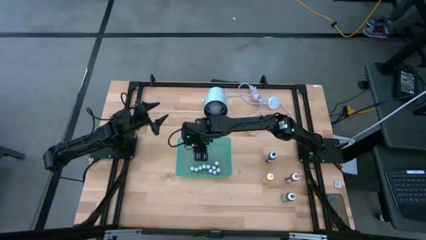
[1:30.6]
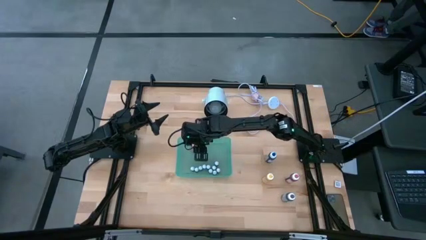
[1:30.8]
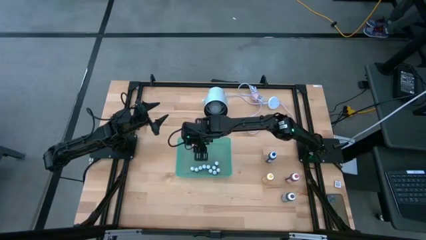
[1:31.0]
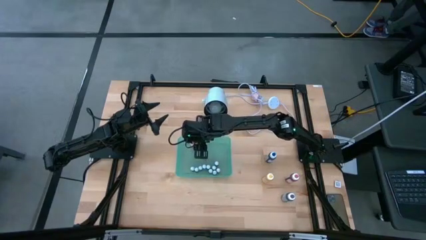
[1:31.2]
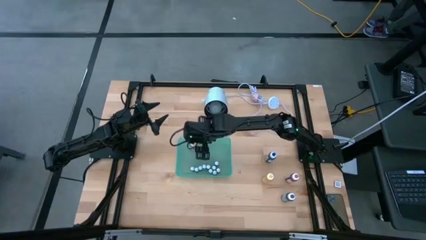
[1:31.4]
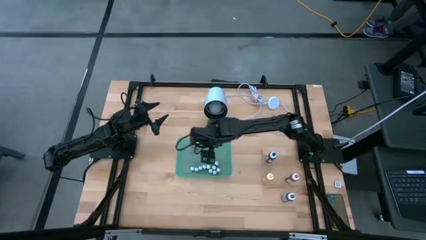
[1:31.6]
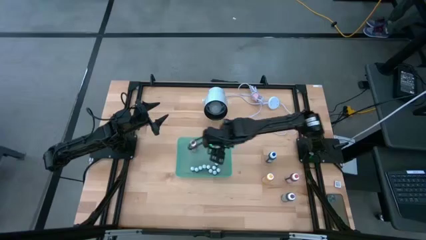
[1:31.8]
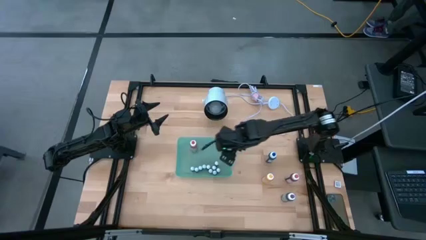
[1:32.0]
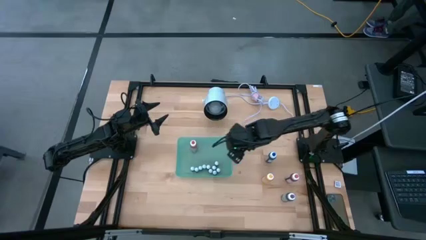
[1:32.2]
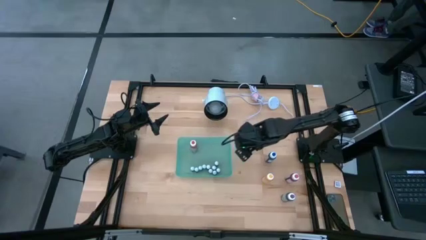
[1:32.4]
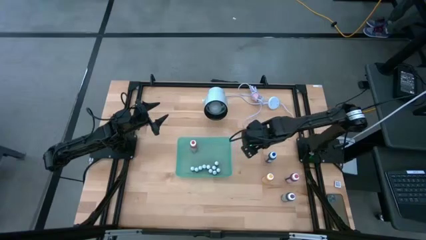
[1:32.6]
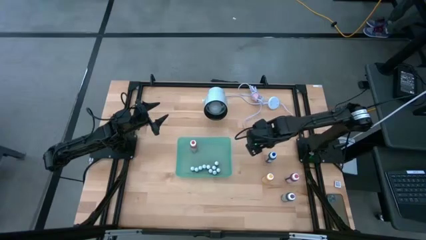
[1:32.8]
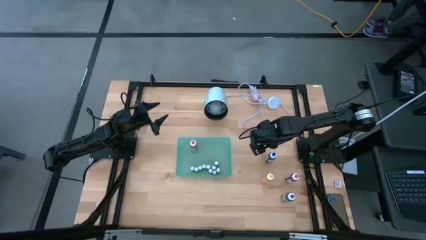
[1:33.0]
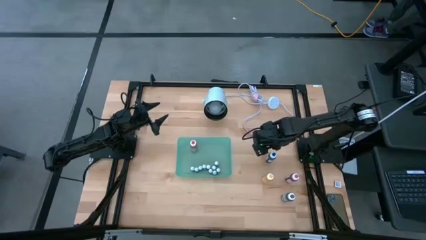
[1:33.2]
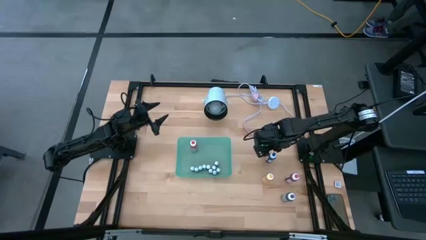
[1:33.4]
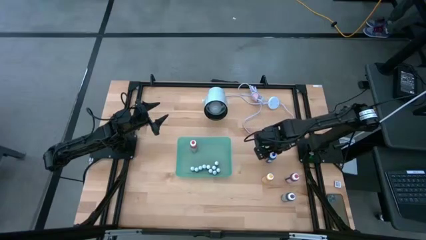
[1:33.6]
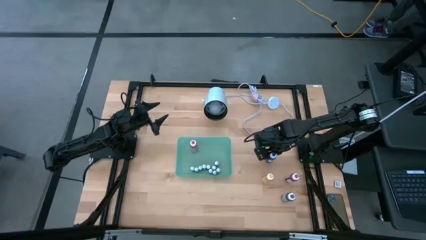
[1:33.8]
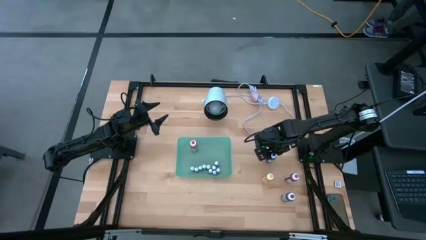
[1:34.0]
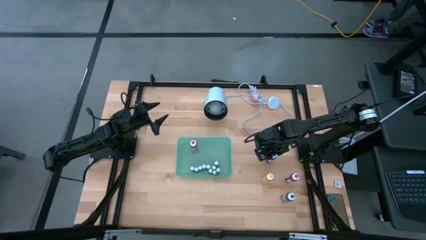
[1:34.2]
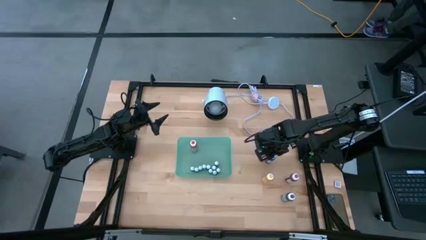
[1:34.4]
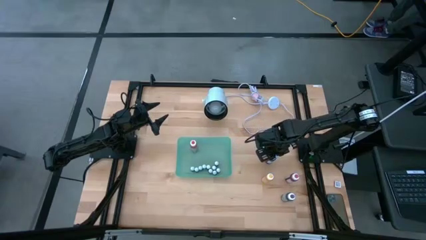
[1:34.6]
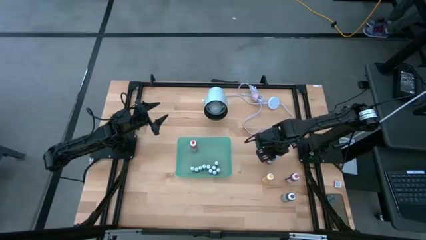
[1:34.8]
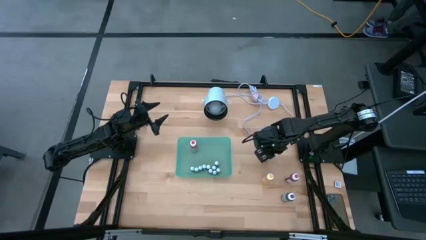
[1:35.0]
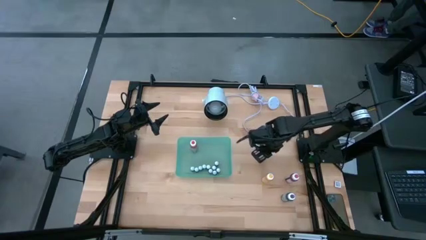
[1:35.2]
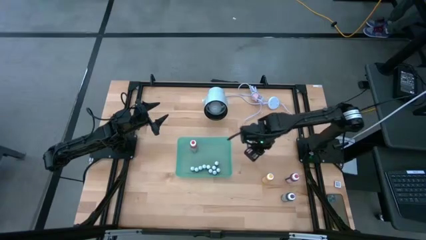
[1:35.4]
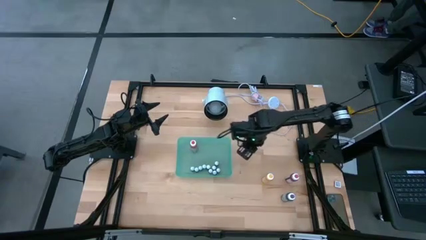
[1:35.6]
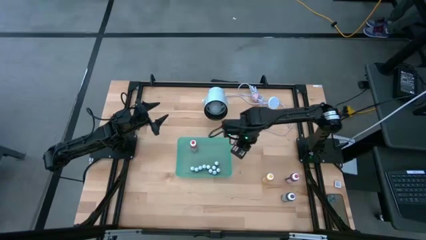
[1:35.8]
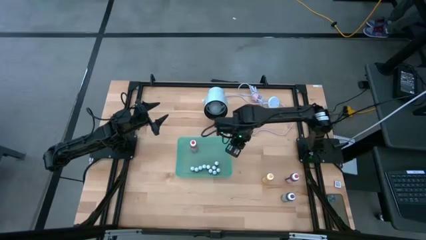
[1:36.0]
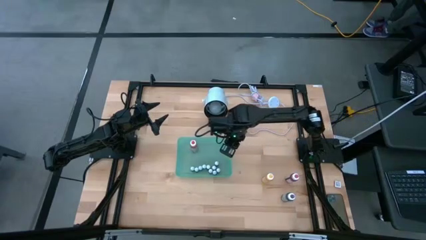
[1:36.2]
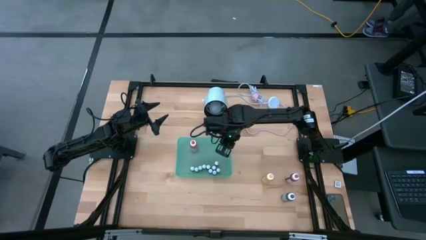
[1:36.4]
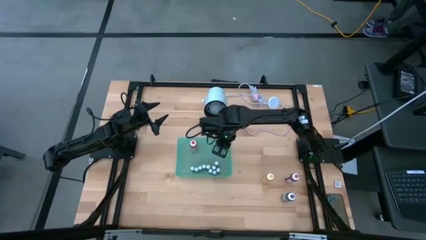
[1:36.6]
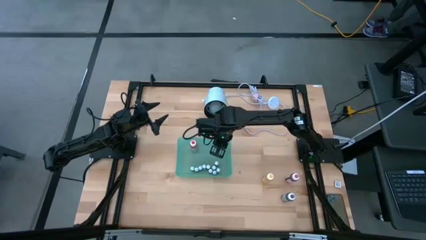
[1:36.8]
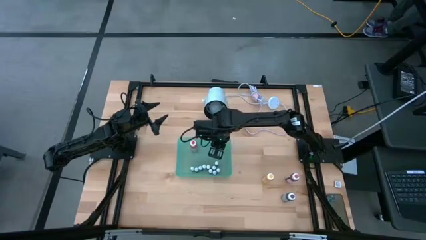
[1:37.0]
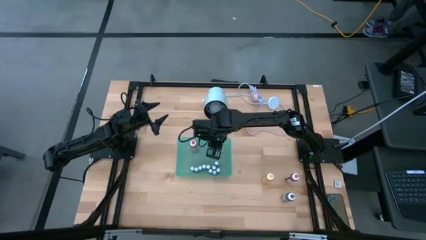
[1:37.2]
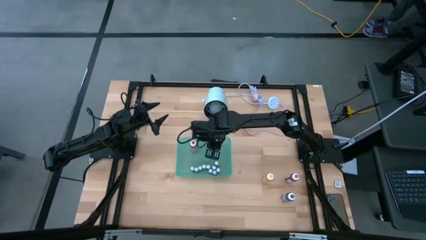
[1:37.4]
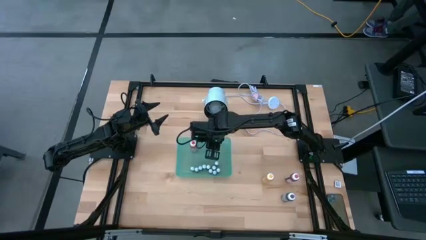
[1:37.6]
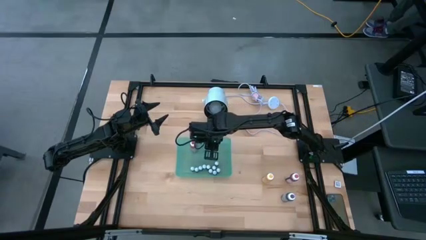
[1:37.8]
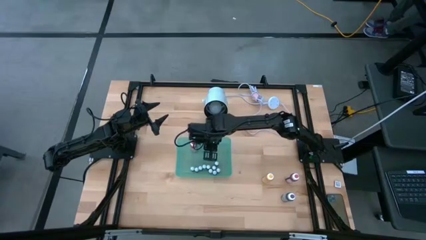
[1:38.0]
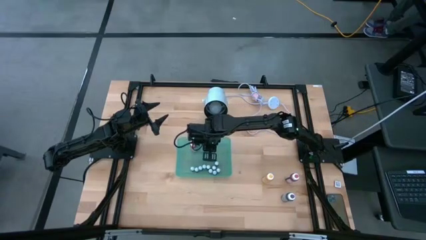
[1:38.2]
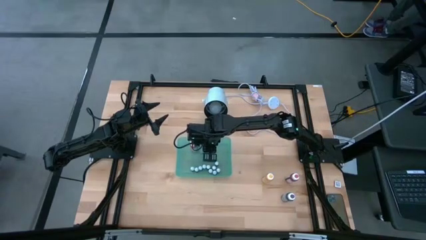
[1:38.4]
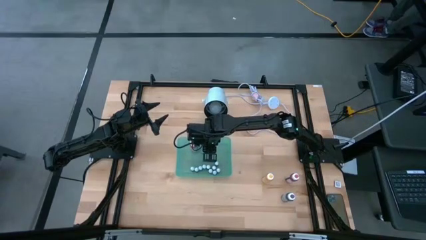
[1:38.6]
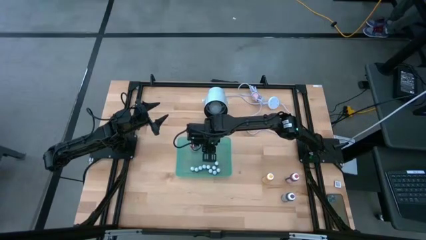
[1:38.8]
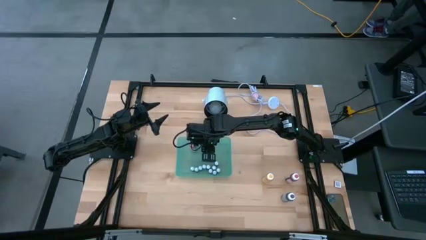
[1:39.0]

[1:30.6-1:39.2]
Task: Pick & Place food coloring
Put the large blue food coloring bottle into the bin

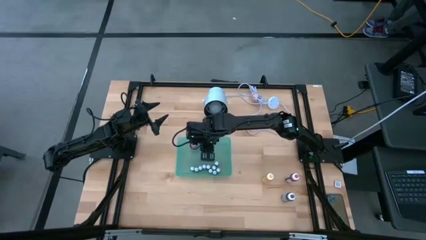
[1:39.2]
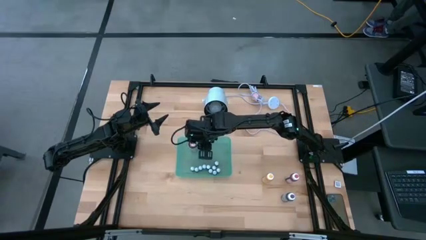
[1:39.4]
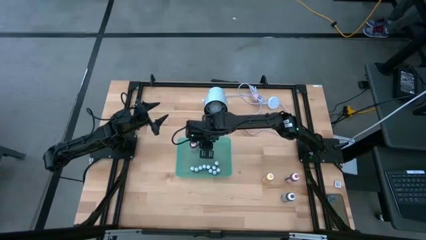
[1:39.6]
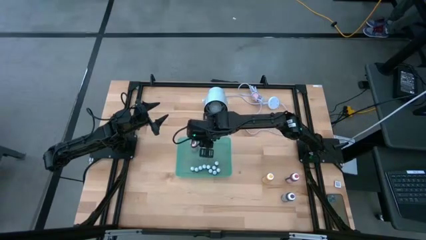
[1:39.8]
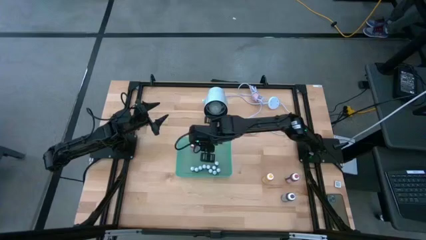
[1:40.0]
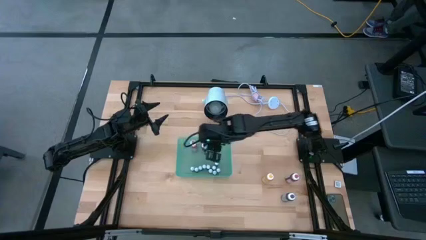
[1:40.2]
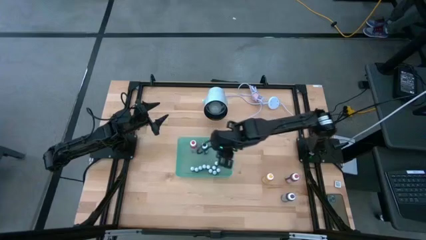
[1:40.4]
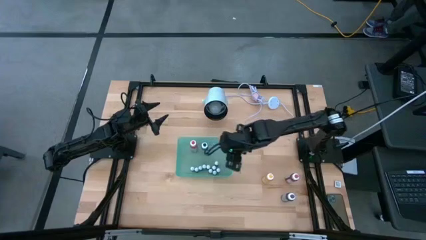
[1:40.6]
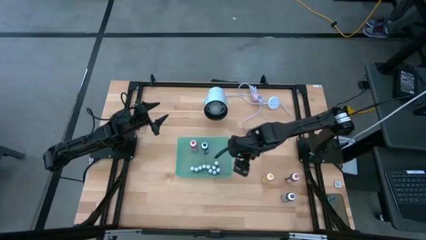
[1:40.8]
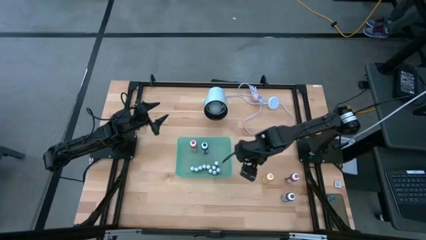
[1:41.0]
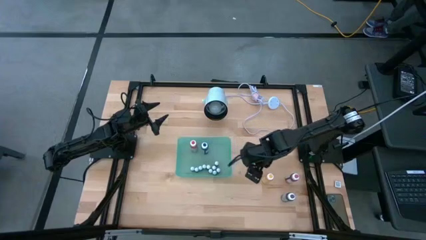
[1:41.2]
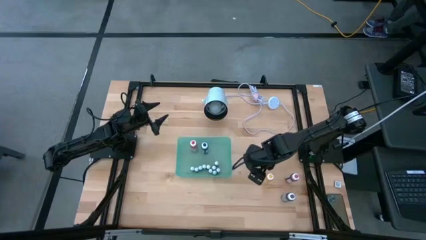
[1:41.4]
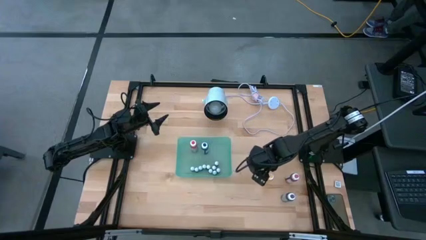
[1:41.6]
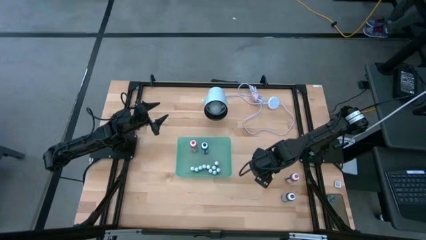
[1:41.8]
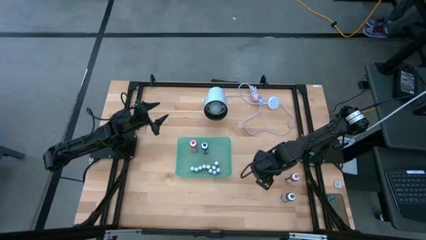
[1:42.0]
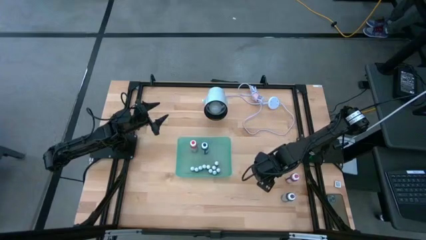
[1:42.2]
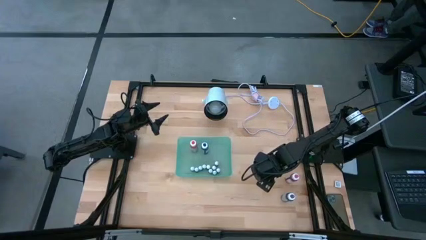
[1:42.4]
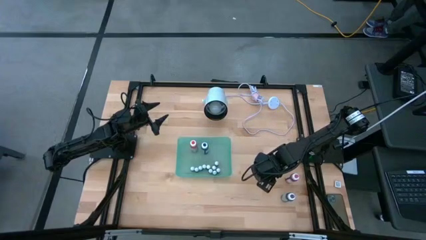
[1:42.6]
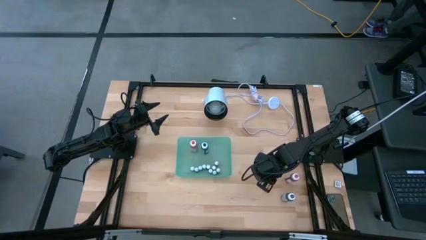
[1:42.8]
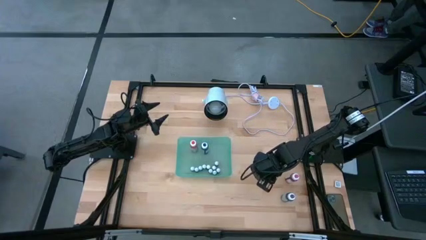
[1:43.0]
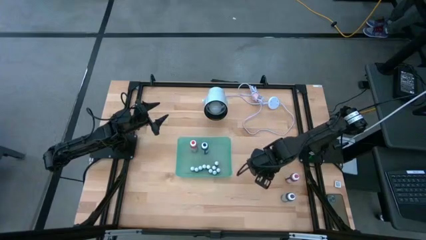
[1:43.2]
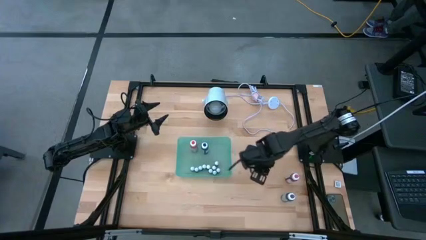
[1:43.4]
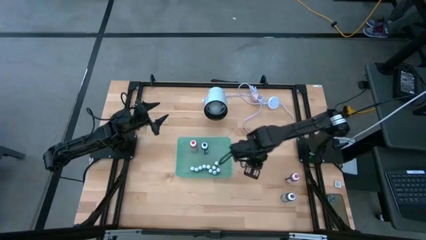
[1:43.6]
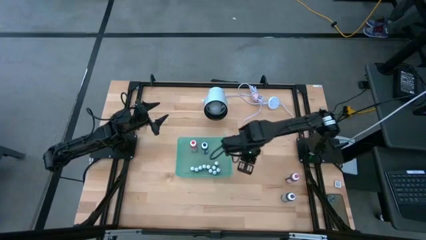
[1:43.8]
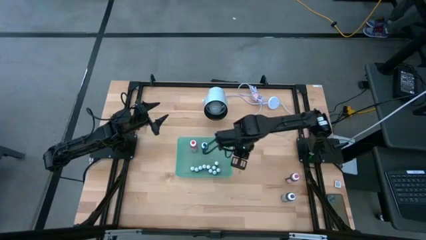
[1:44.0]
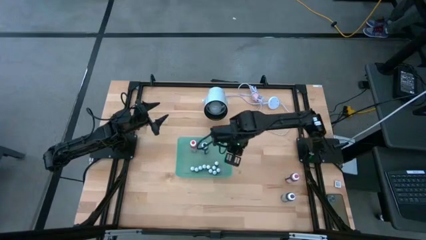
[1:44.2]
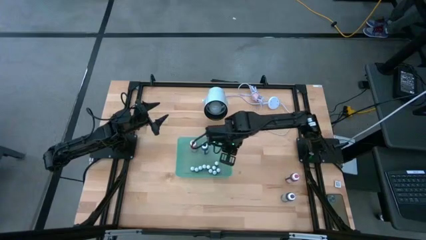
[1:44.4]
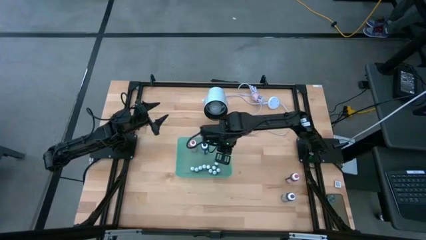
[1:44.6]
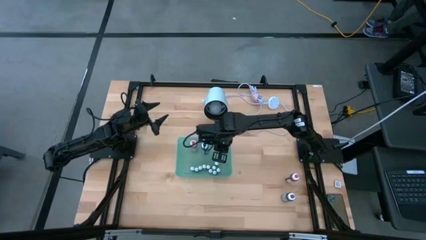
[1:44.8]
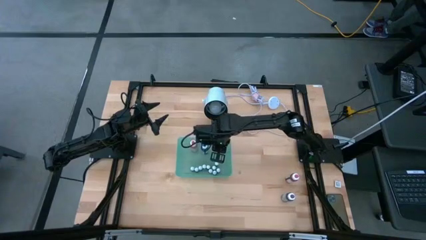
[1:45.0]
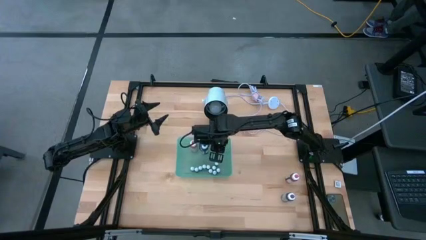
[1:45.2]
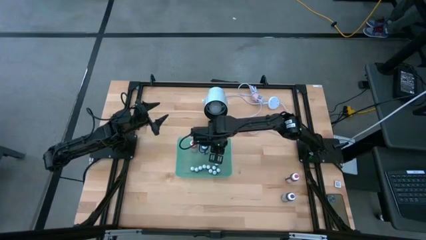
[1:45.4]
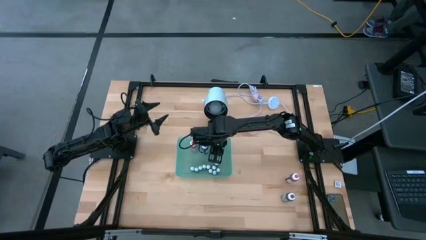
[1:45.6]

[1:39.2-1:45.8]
Put the large yellow food coloring bottle into the bin
